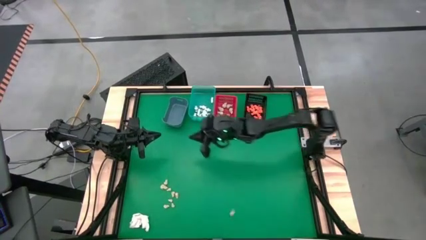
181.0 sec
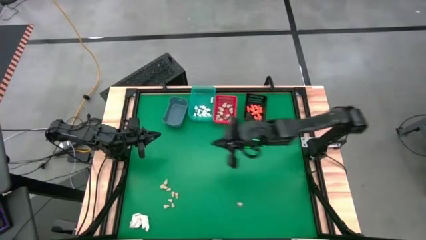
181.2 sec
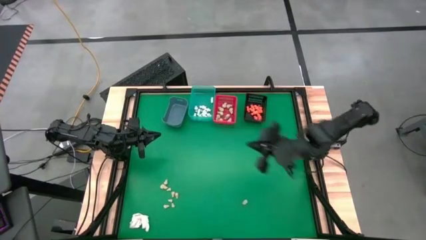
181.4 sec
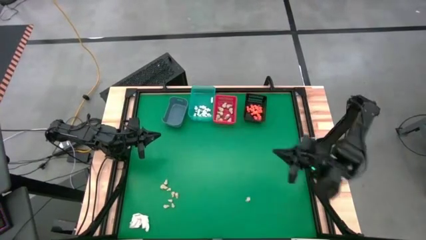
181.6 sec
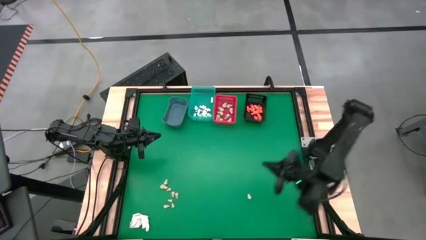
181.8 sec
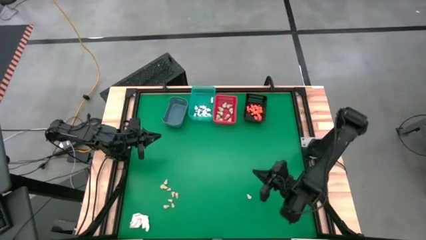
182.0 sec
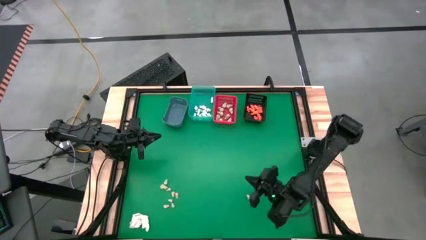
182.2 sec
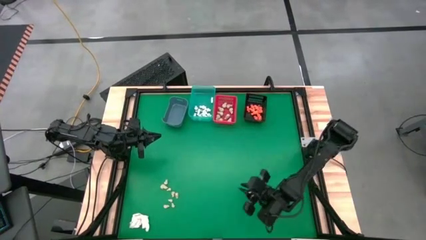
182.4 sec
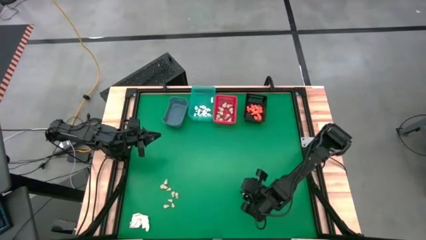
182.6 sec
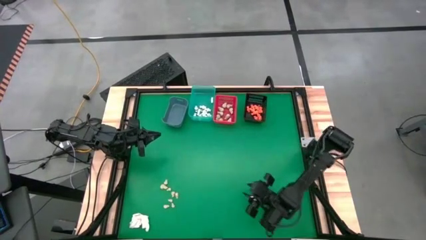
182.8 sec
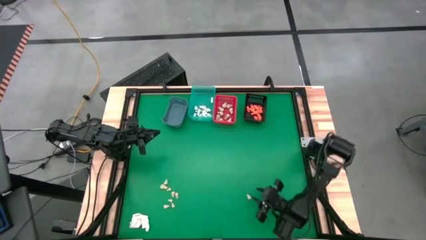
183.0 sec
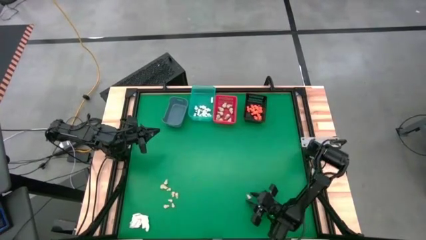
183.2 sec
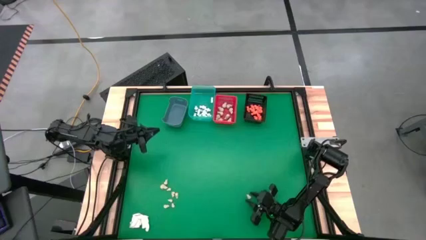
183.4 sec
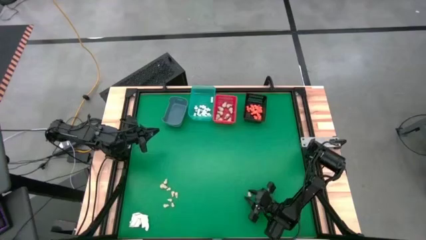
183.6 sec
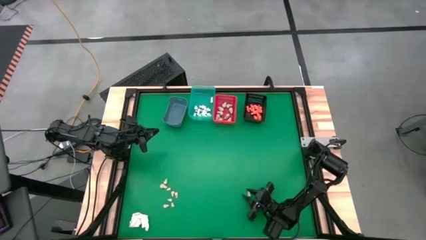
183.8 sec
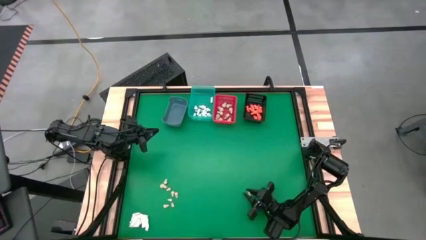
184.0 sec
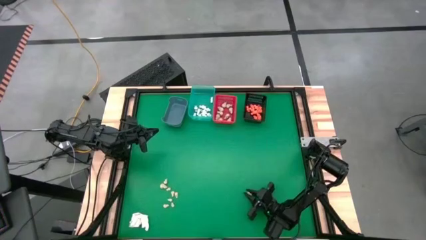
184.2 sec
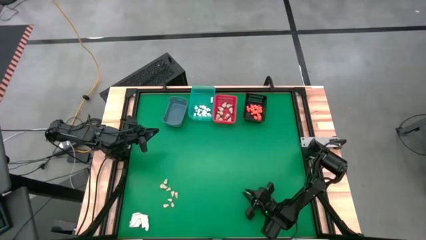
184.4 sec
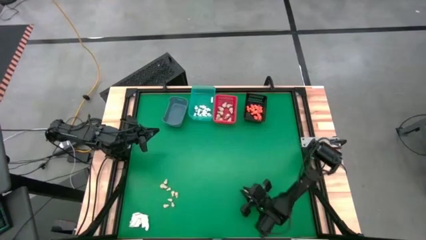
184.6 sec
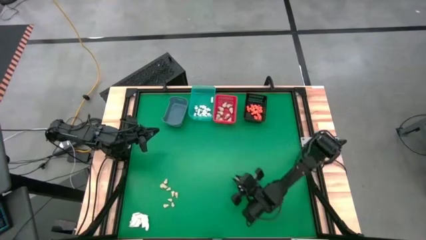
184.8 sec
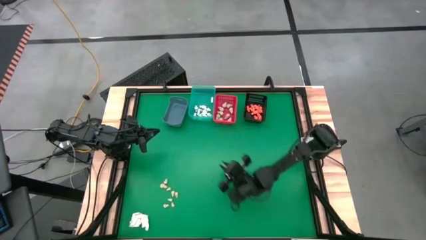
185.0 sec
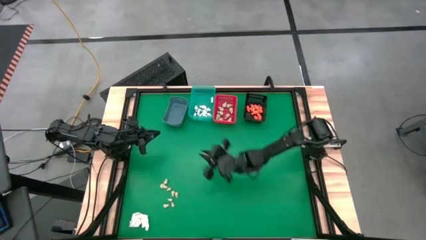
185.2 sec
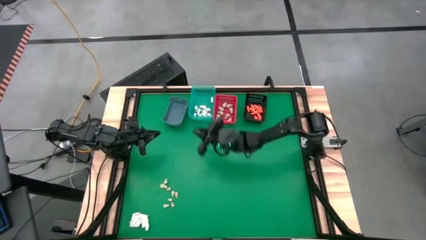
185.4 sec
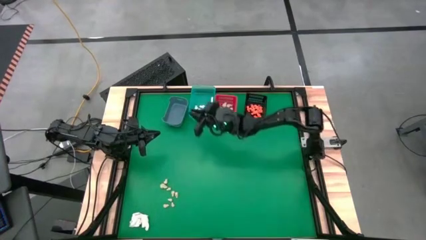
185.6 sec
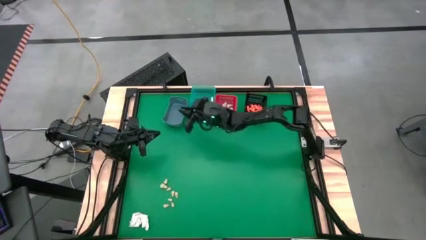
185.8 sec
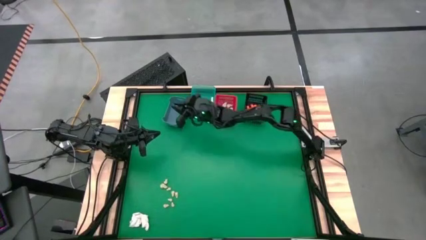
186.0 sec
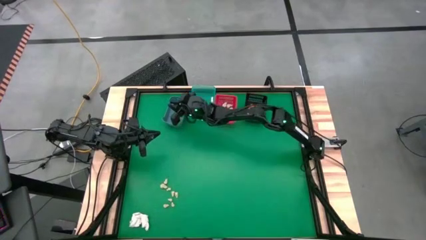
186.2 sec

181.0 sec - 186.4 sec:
Task: Sort Halloween decoration
Put the white skull toy into the blue bin

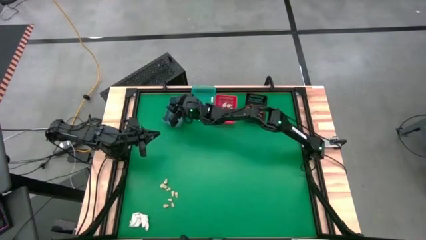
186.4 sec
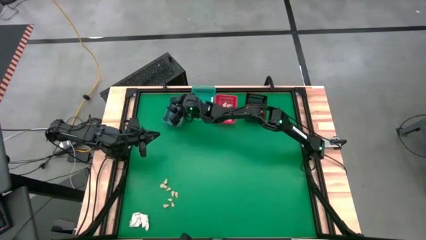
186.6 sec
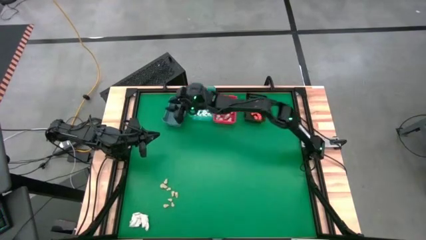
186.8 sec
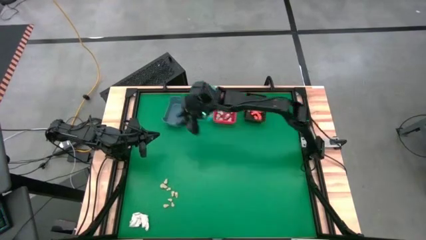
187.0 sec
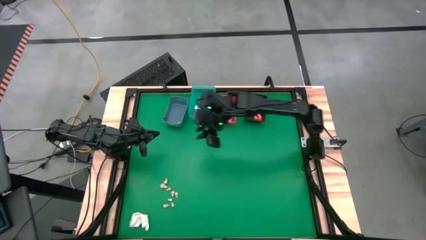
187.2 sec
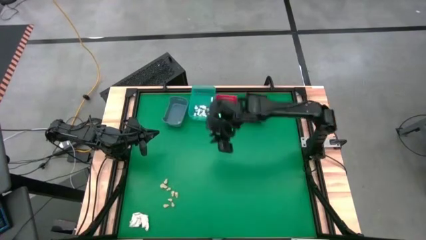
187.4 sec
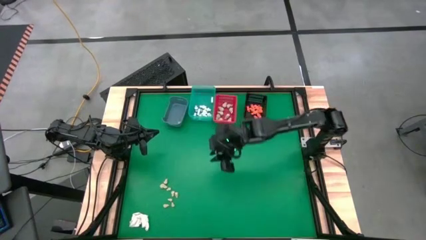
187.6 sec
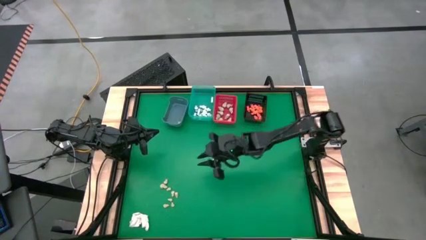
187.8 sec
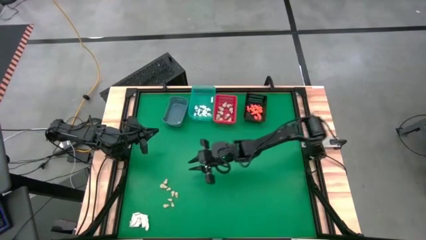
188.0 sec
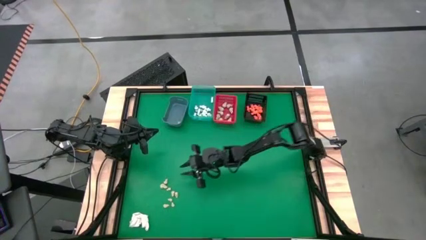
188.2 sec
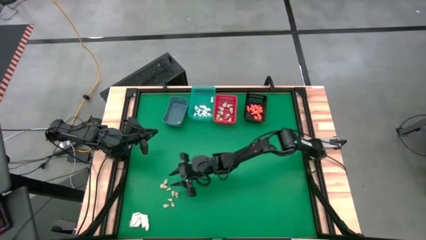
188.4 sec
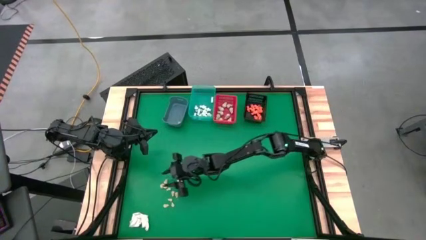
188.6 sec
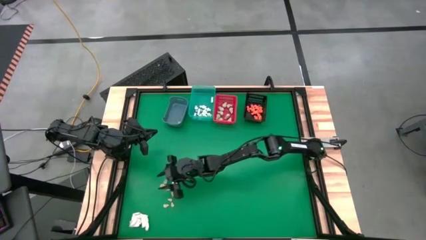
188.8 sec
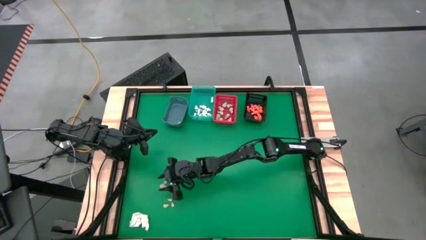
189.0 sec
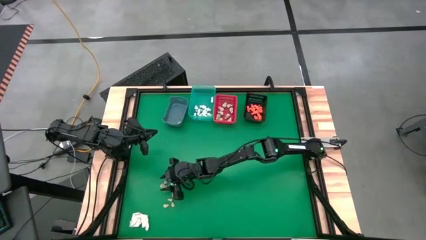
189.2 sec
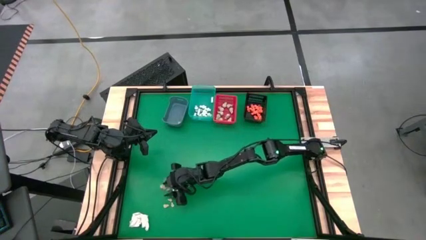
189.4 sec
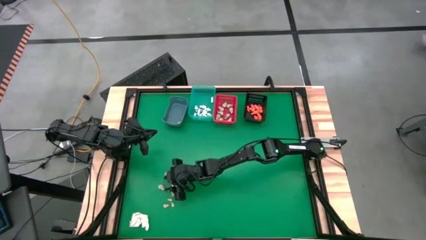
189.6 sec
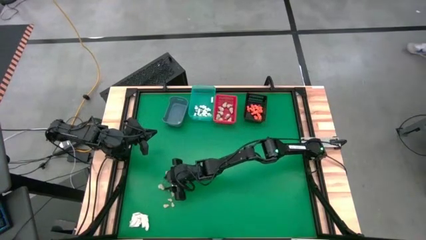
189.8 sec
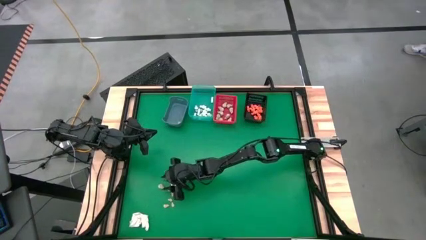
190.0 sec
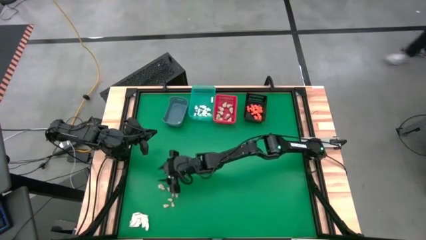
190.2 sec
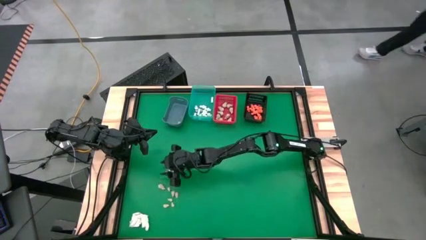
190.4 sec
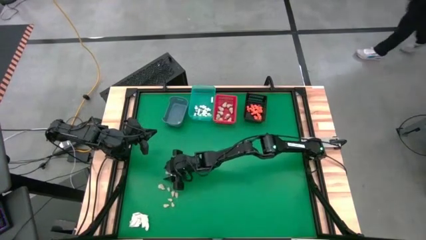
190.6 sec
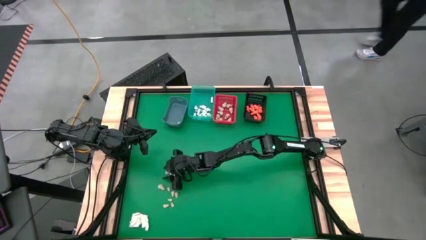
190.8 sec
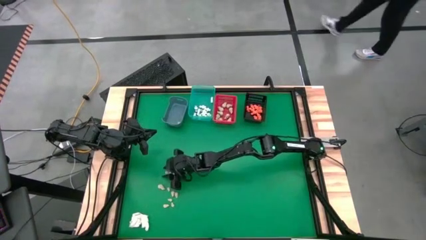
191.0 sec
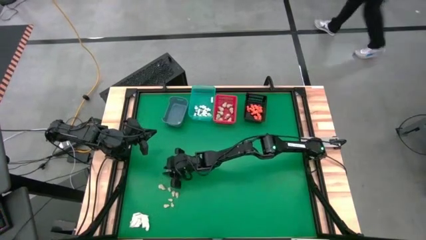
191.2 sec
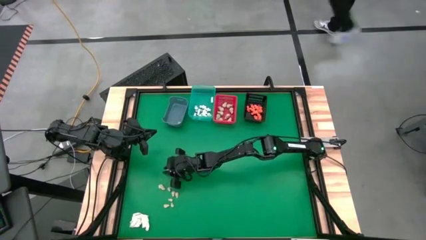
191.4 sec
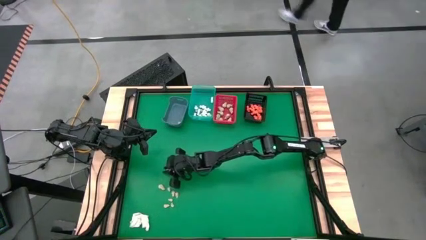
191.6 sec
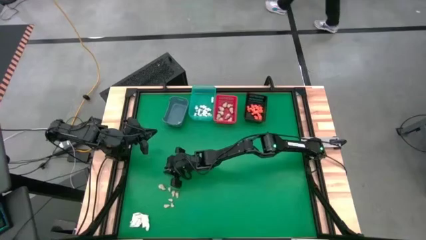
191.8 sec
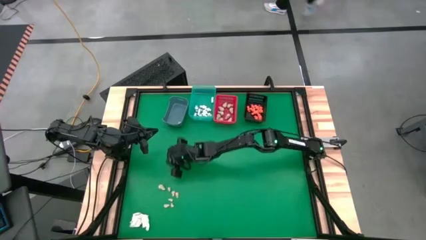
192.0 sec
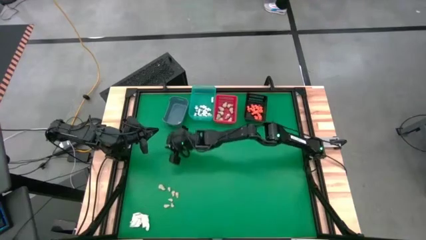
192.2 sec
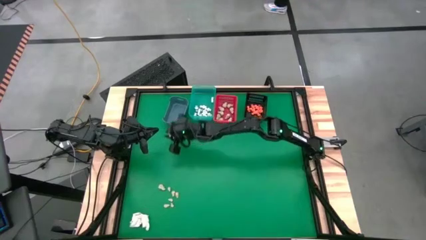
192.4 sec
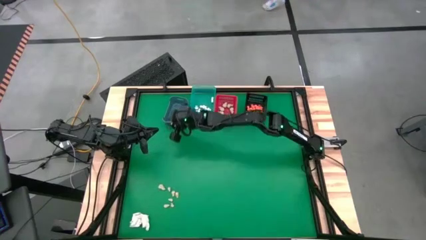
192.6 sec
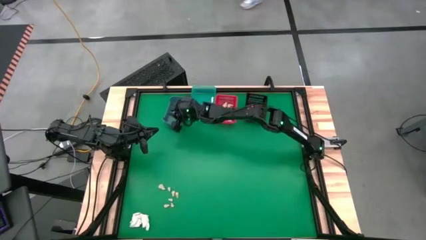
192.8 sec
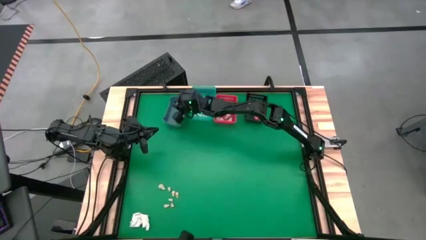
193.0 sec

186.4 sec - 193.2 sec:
Put the white skull toy into the blue bin

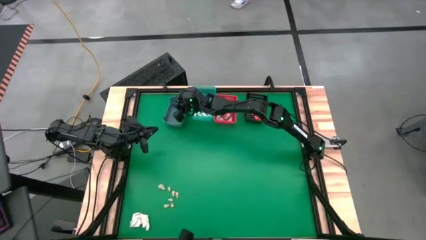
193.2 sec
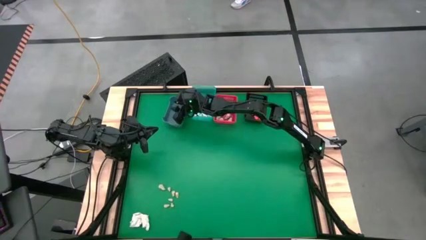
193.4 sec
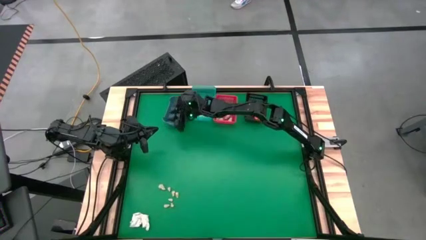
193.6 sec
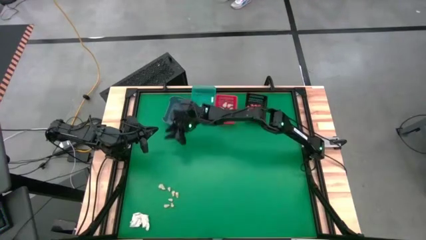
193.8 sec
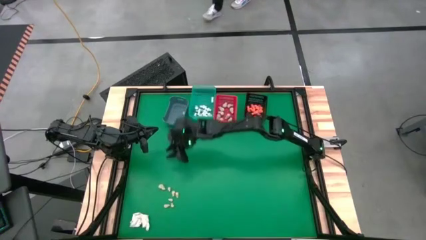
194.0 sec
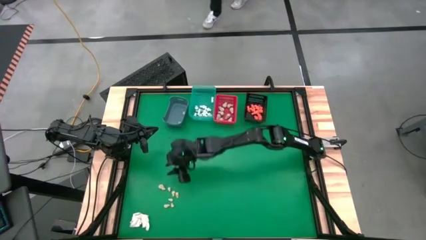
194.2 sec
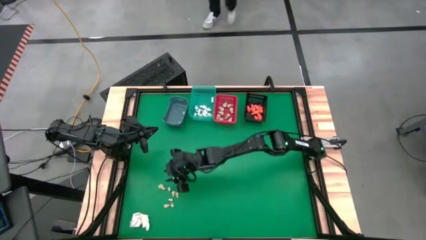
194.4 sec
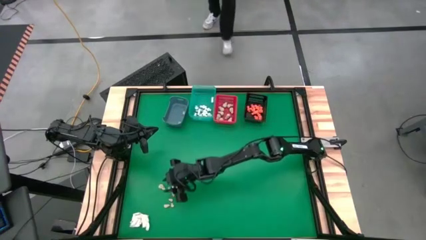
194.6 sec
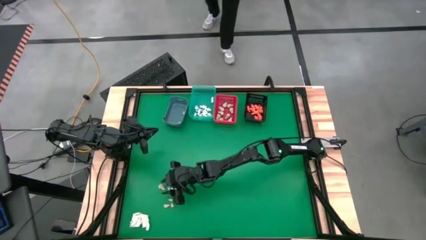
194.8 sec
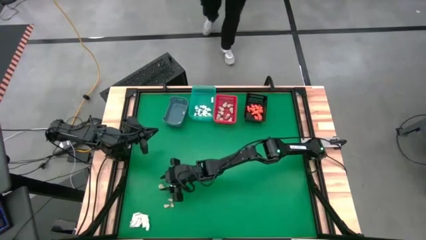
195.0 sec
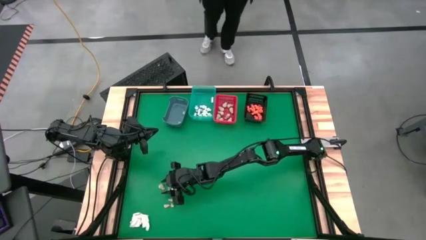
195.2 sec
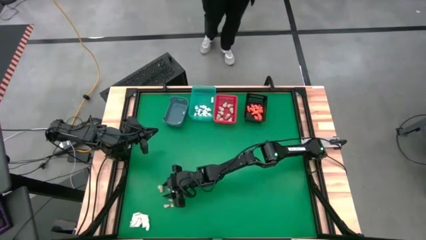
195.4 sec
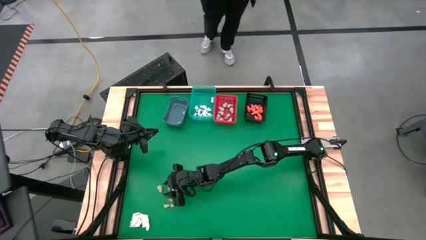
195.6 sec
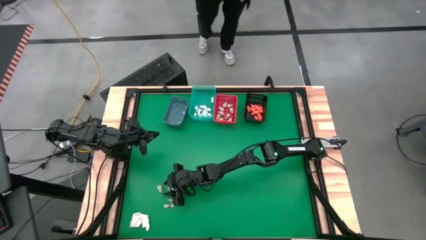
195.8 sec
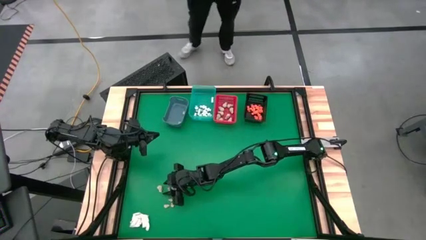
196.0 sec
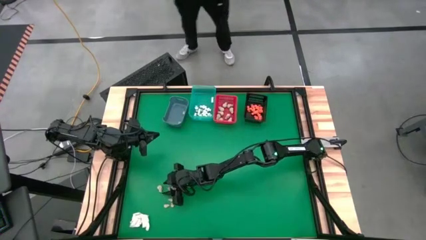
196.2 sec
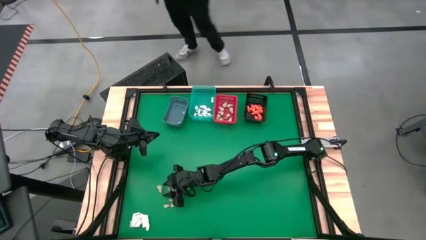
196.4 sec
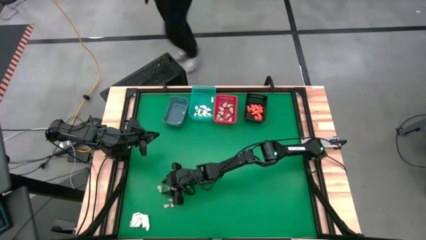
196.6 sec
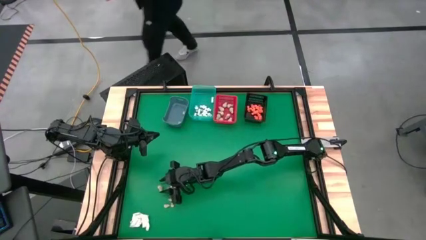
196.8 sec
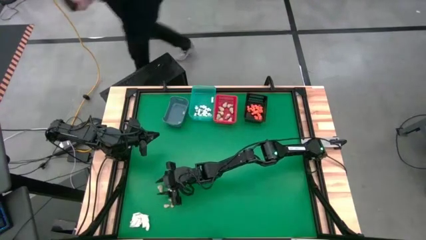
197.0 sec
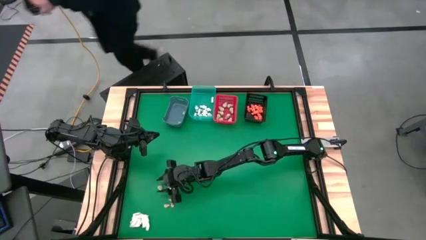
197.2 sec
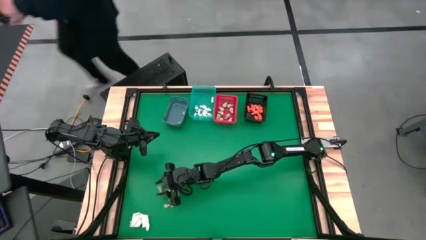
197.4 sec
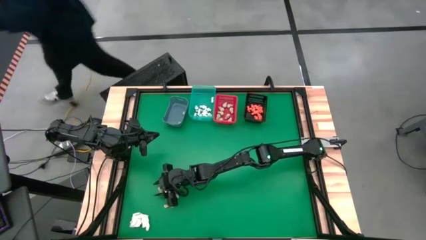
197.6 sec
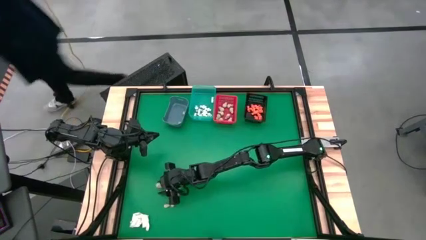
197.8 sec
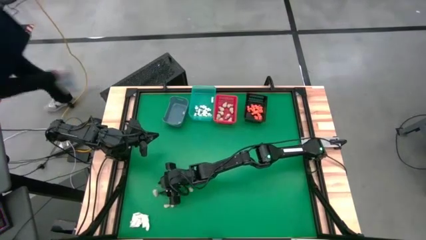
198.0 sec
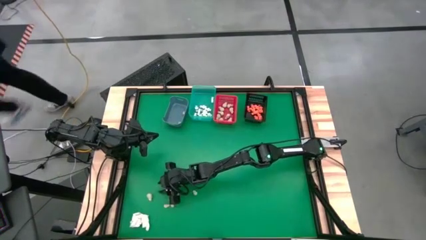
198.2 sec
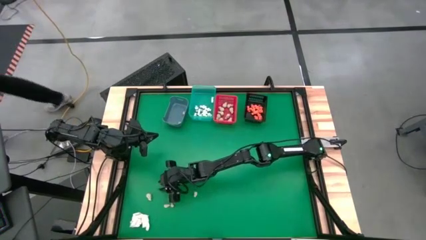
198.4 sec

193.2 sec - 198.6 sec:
Put the white skull toy into the blue bin
